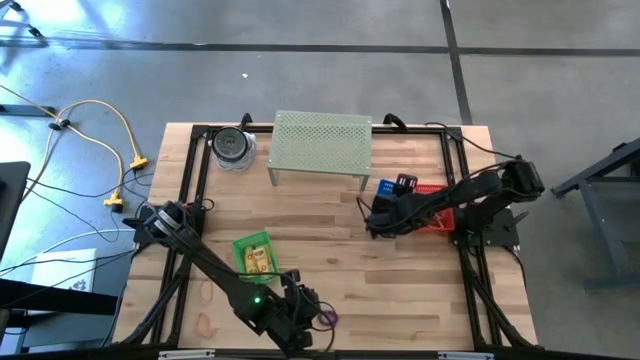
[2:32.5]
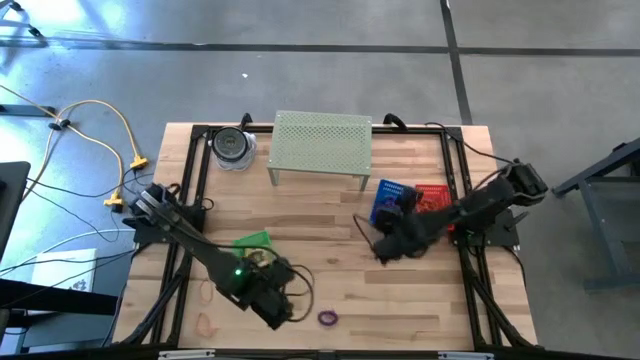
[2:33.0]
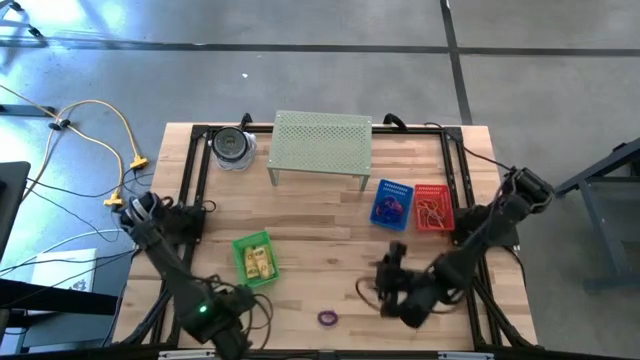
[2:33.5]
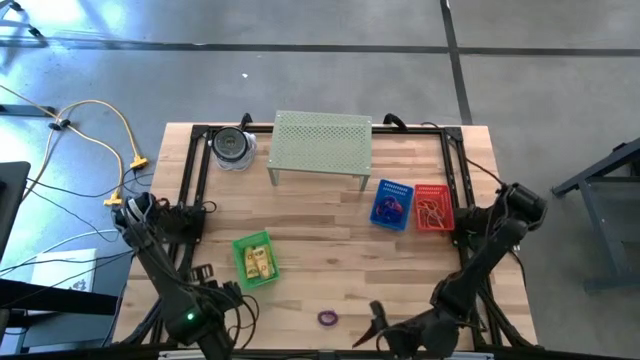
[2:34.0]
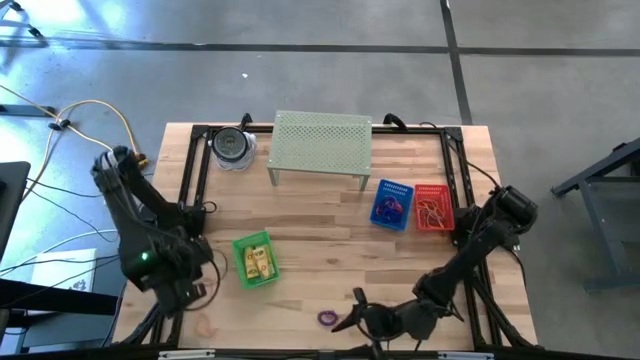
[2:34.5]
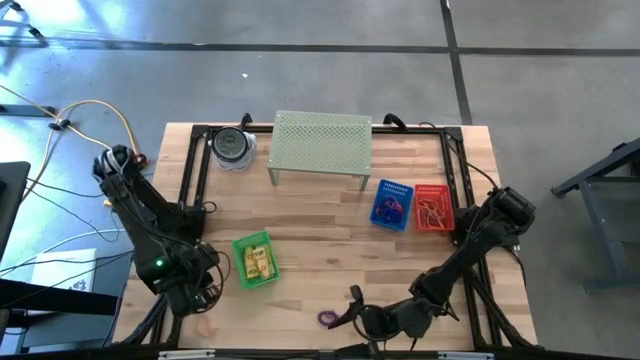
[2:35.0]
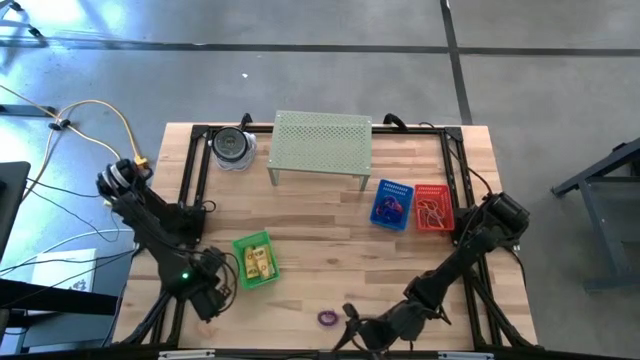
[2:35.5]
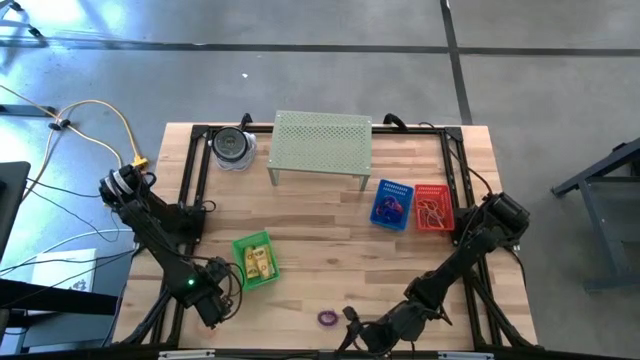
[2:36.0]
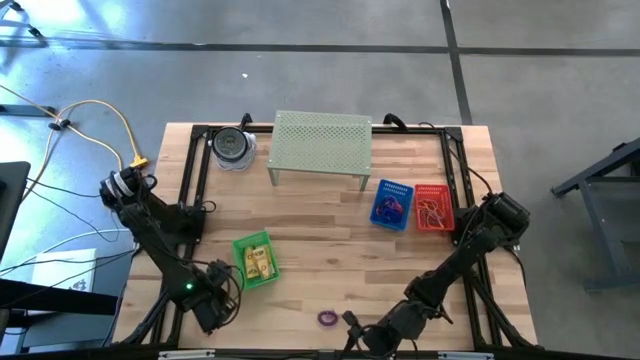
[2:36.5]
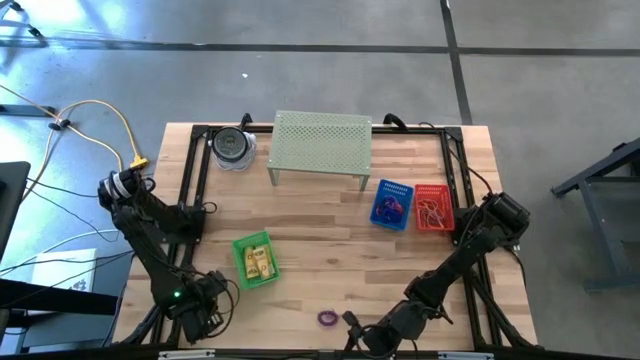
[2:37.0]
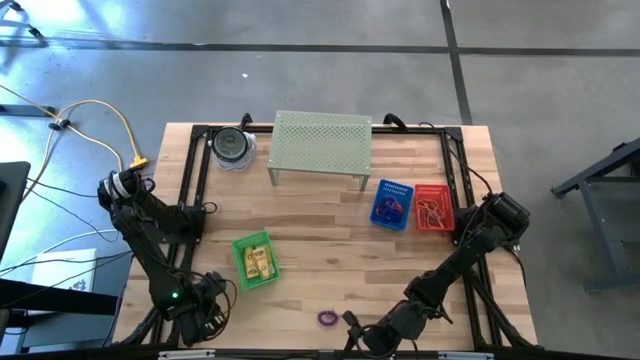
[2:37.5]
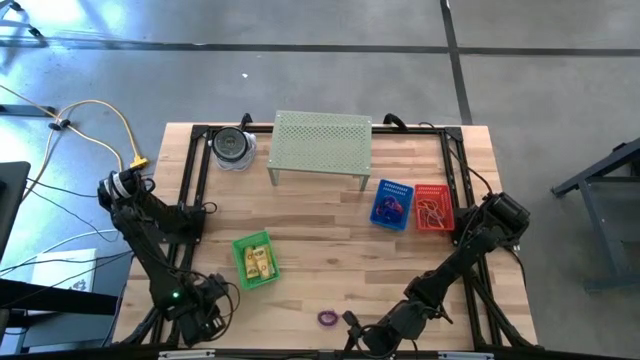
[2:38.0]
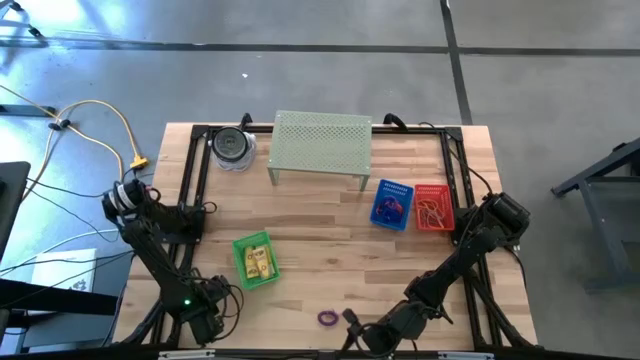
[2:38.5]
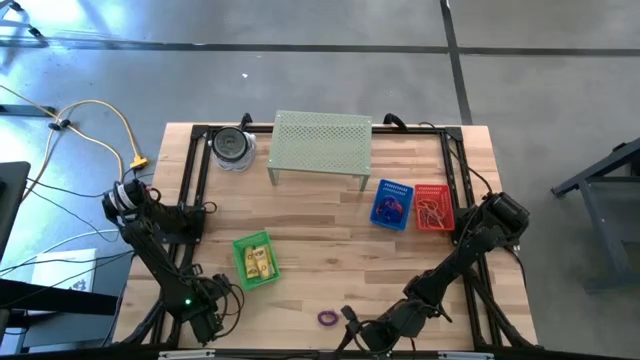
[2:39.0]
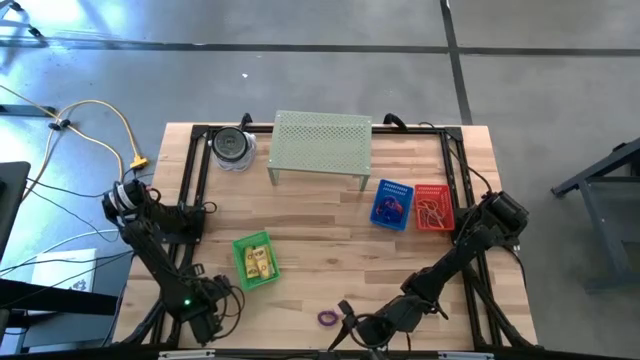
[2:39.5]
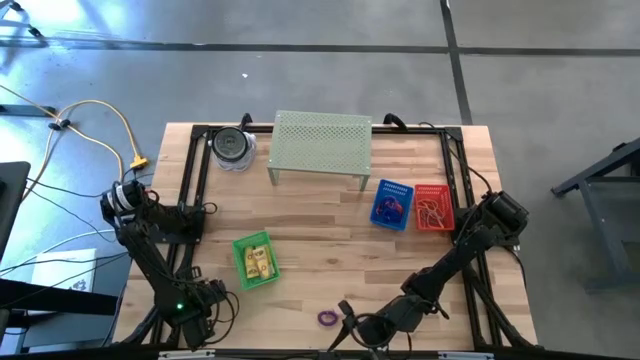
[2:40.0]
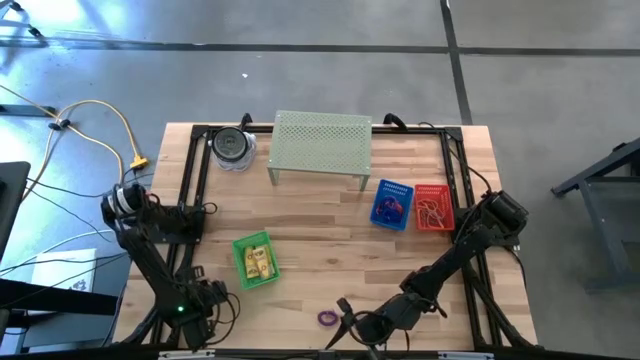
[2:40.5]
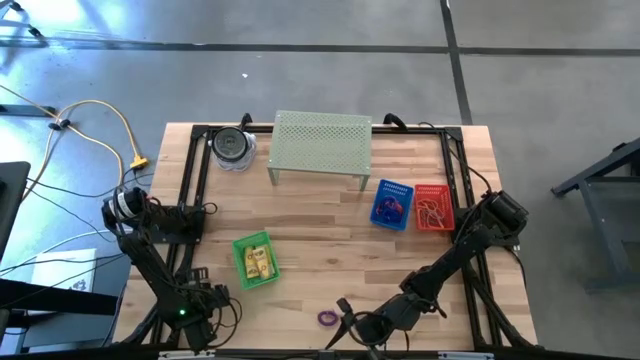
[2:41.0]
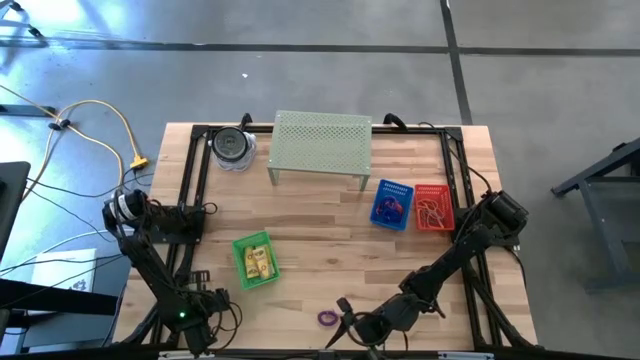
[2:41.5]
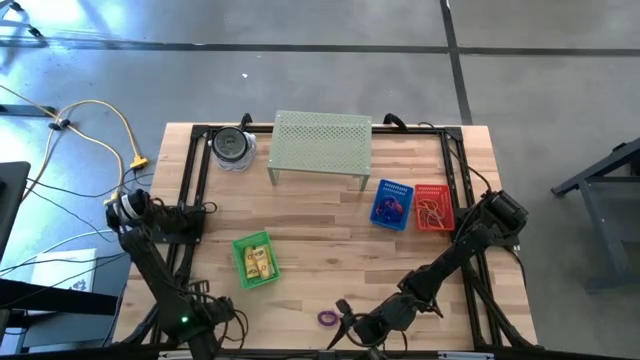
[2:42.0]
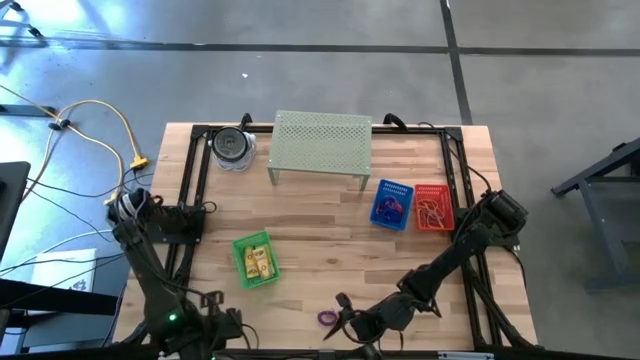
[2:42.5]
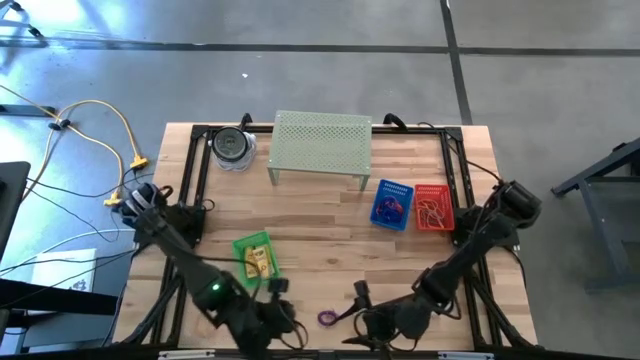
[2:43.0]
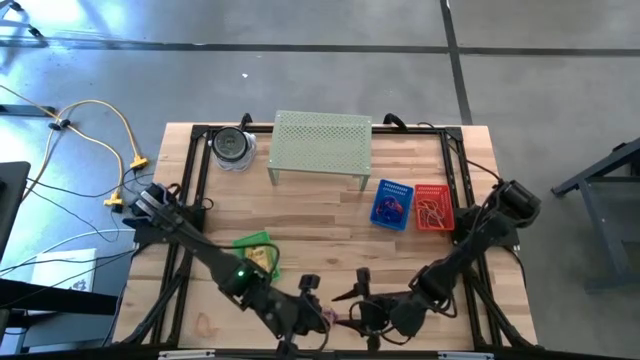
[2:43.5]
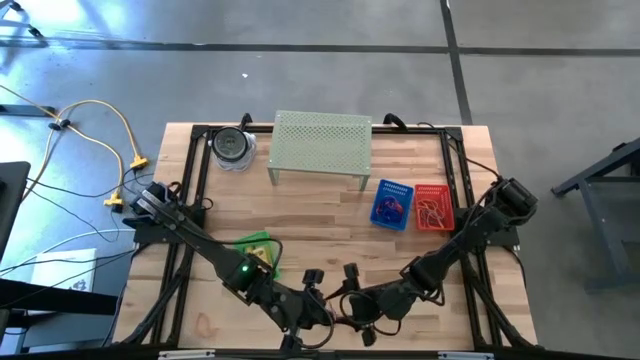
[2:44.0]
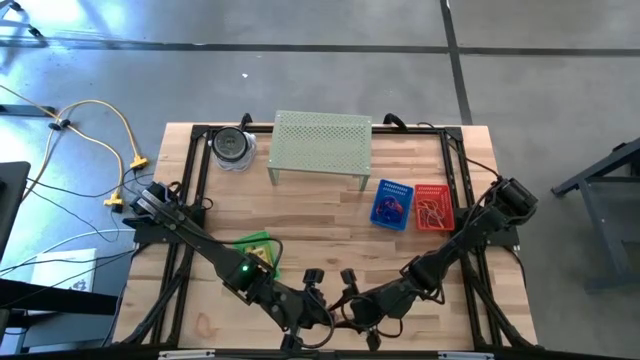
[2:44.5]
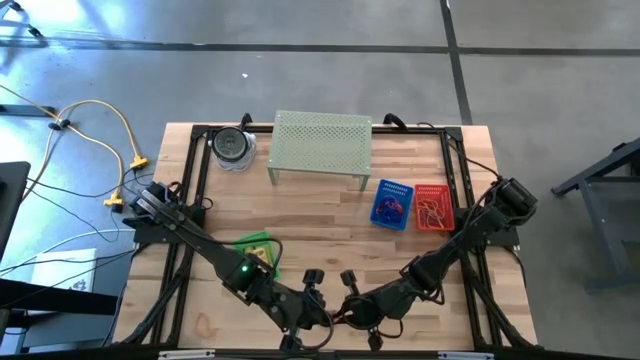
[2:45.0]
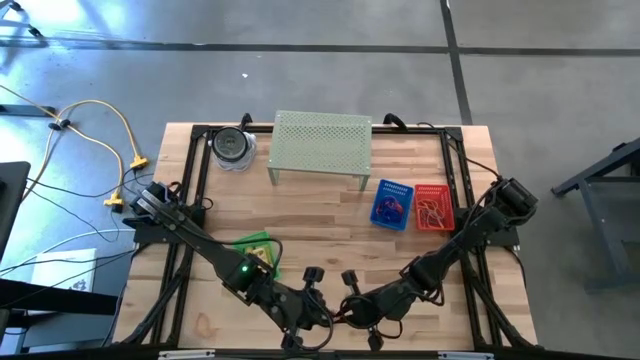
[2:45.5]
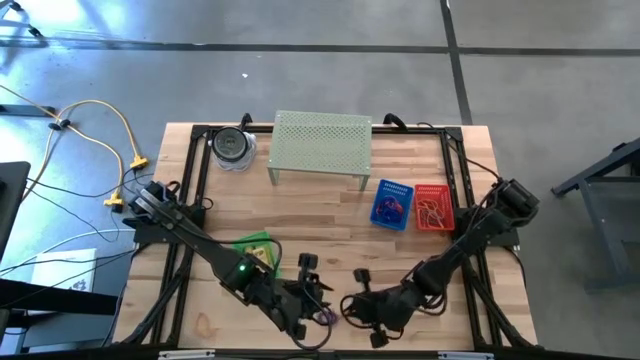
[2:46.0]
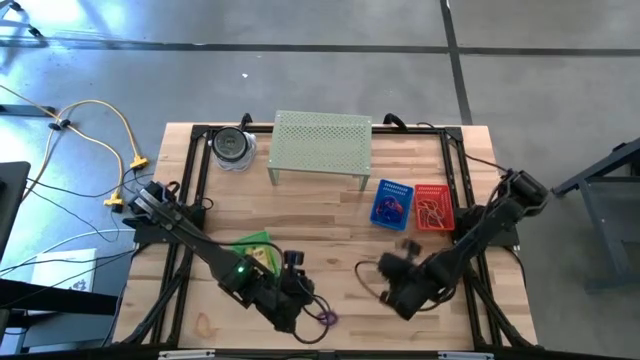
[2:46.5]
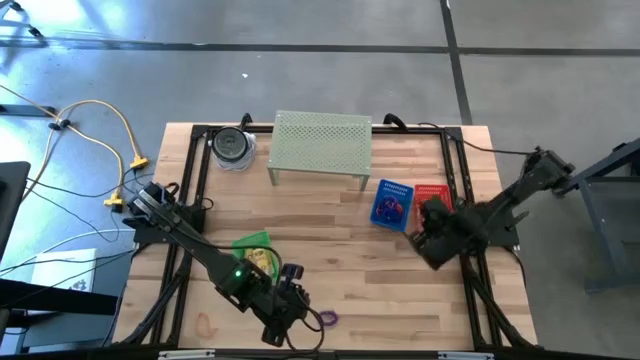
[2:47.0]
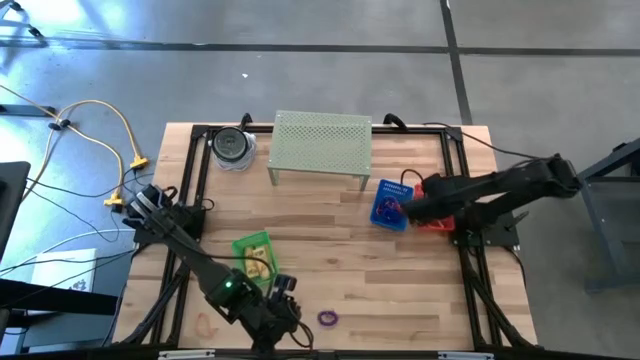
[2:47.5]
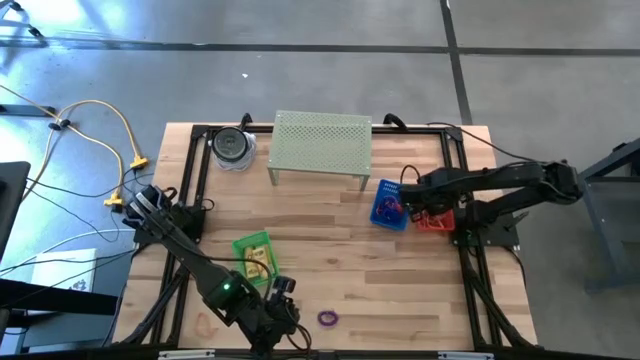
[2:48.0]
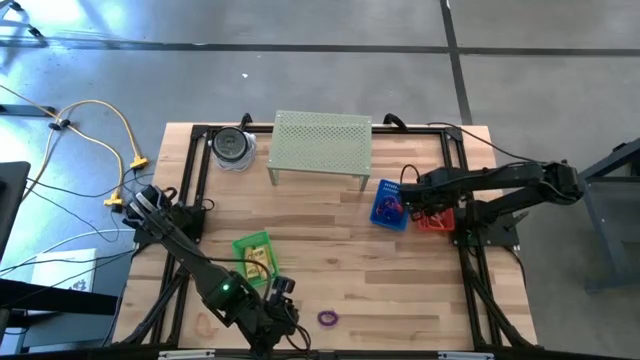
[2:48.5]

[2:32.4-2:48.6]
Task: Pick & Place Office Desk Supplies
Put the orange rubber band into the red bin

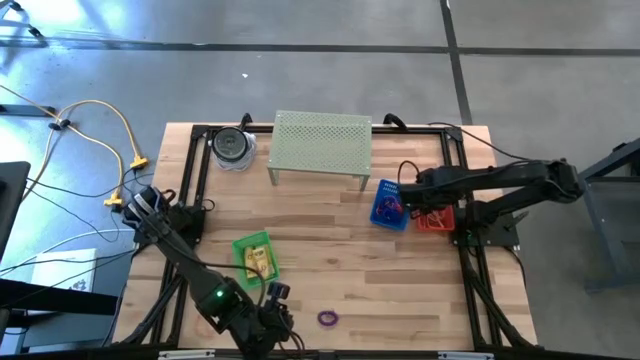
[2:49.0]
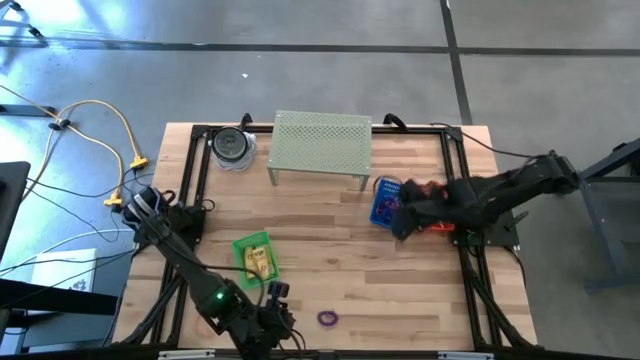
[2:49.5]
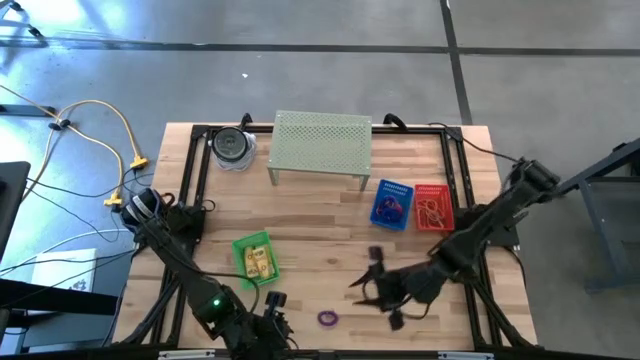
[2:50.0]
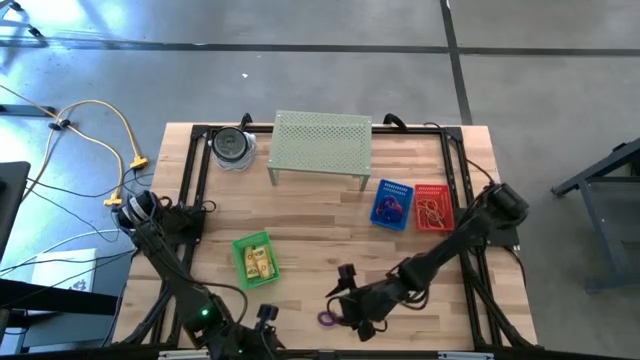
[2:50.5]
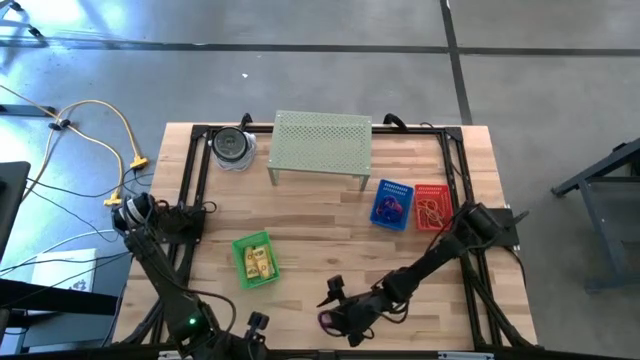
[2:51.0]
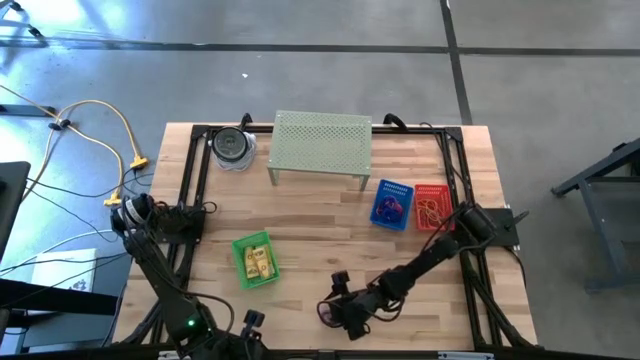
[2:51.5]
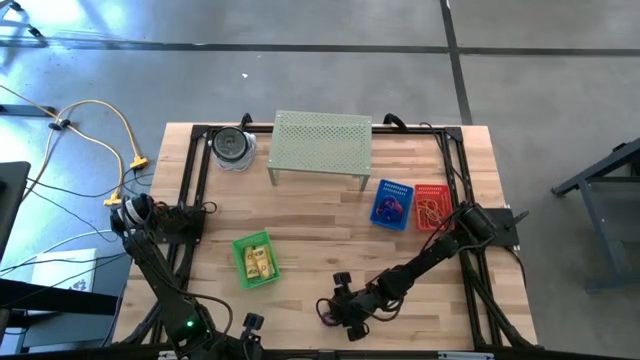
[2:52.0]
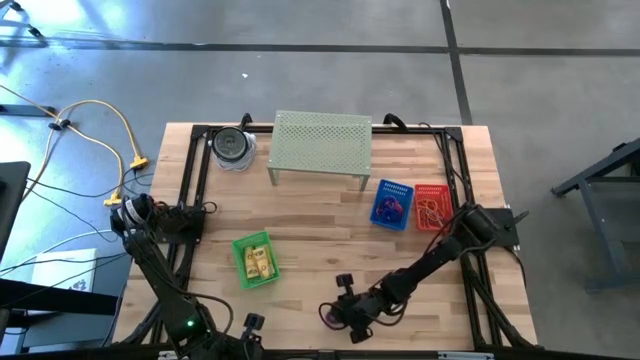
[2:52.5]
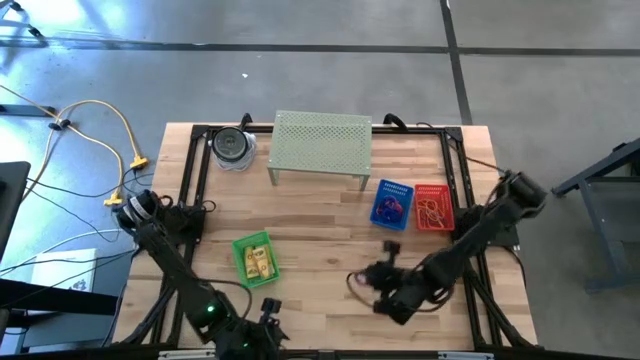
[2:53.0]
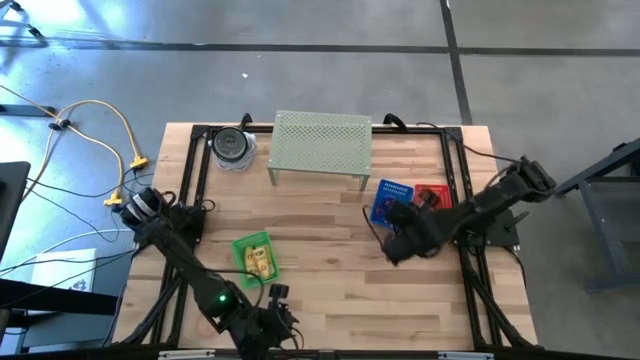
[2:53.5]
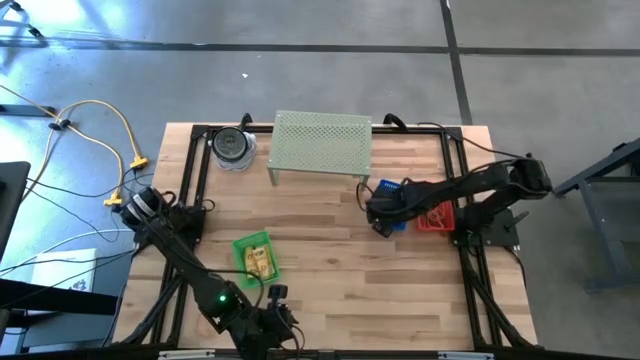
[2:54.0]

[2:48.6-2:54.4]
Put the violet spring keychain into the blue bin
